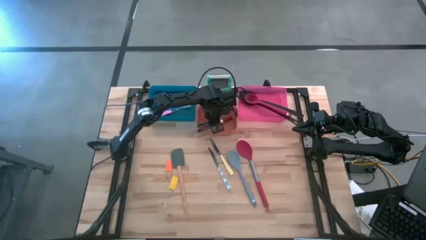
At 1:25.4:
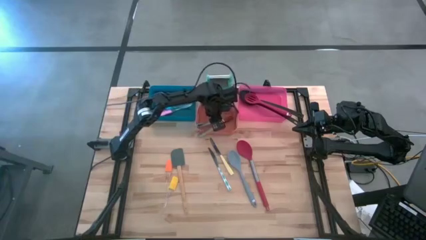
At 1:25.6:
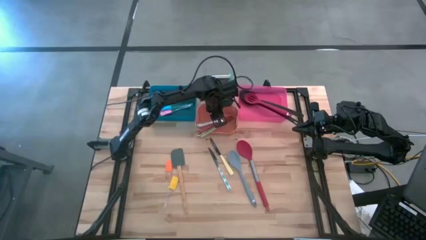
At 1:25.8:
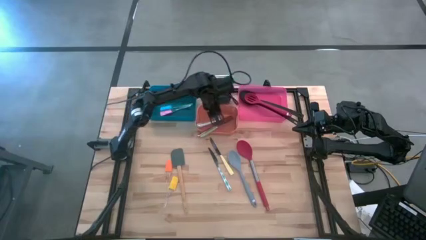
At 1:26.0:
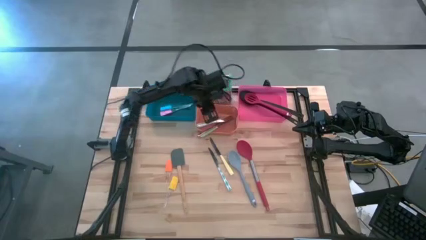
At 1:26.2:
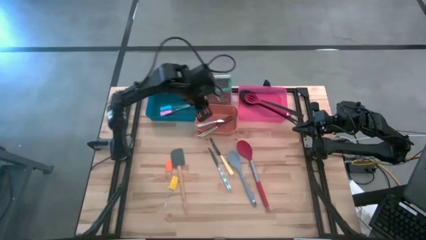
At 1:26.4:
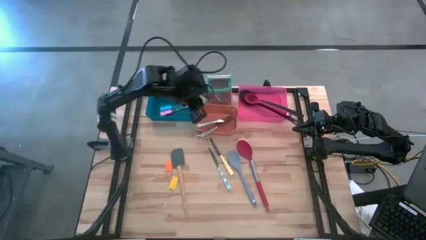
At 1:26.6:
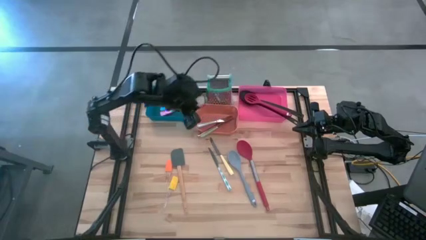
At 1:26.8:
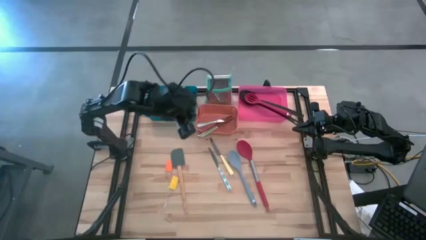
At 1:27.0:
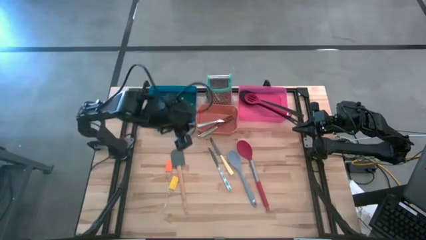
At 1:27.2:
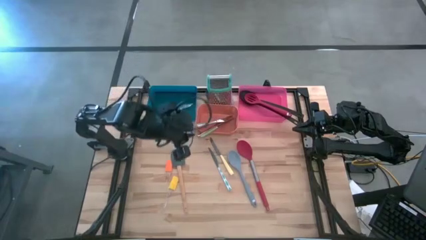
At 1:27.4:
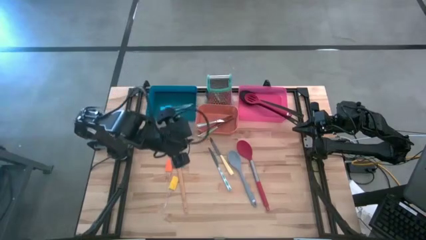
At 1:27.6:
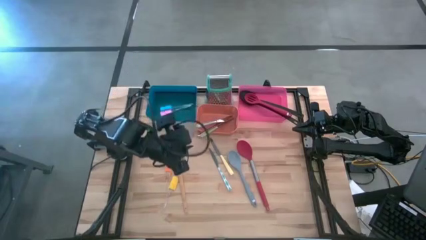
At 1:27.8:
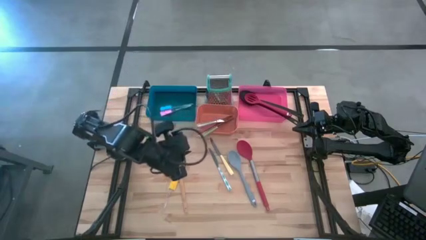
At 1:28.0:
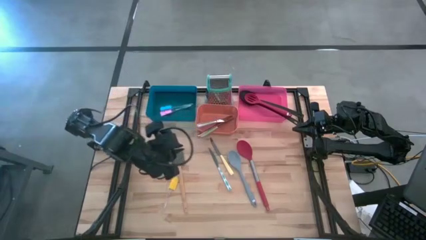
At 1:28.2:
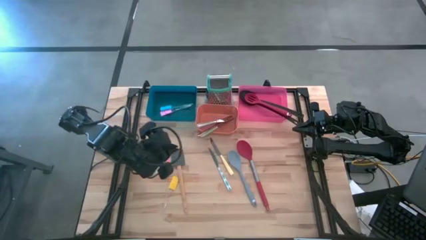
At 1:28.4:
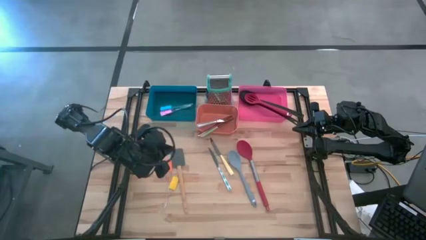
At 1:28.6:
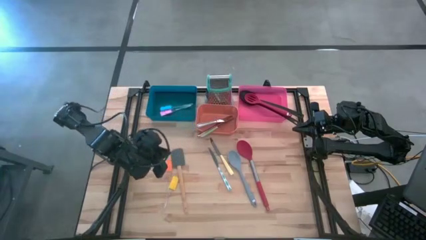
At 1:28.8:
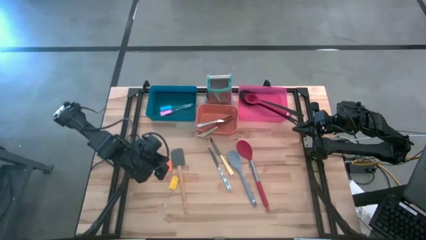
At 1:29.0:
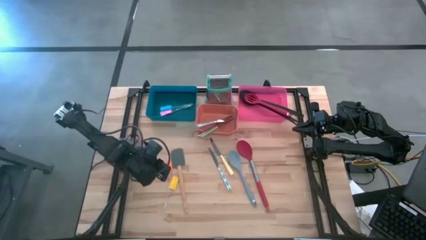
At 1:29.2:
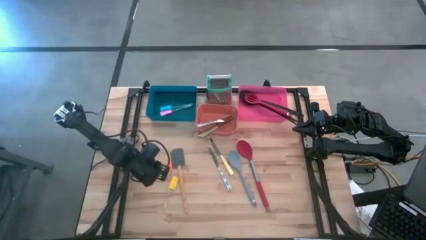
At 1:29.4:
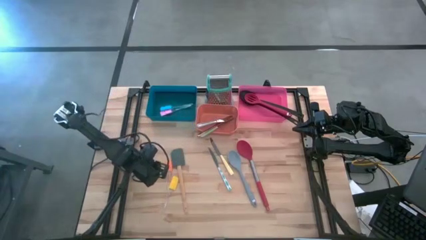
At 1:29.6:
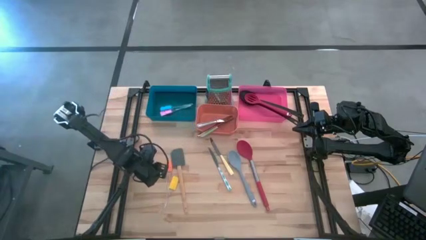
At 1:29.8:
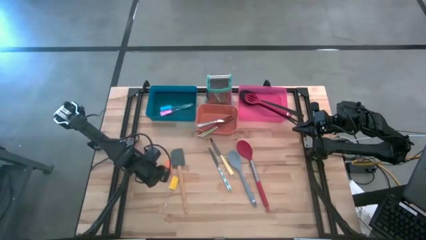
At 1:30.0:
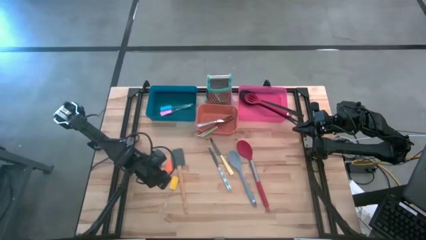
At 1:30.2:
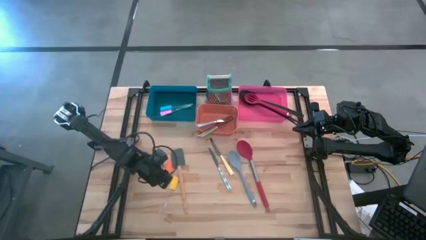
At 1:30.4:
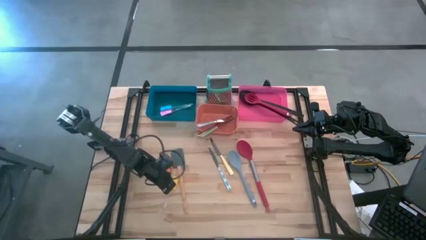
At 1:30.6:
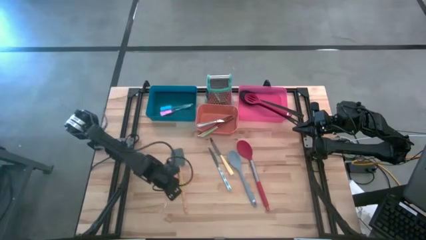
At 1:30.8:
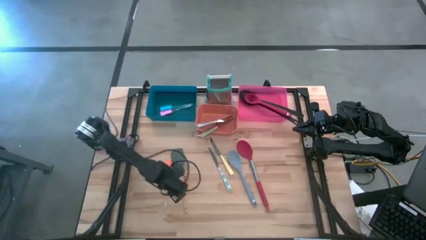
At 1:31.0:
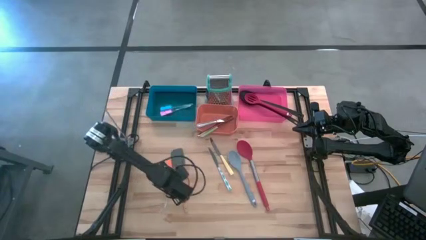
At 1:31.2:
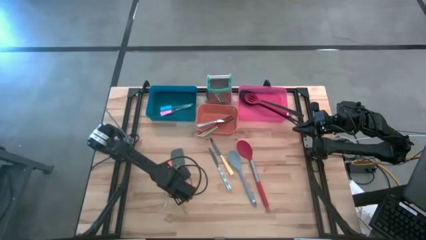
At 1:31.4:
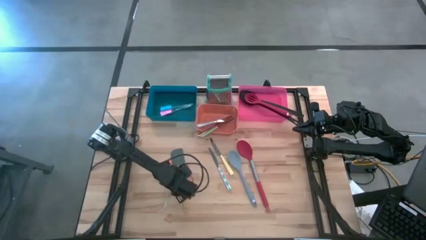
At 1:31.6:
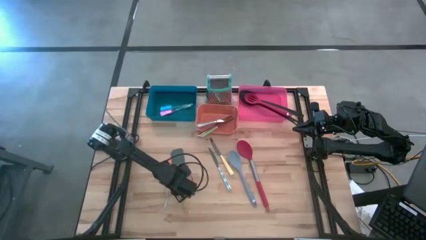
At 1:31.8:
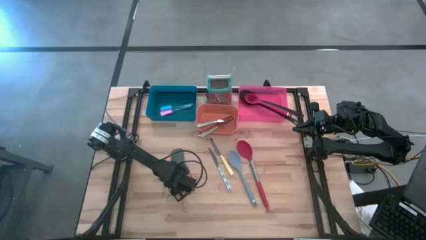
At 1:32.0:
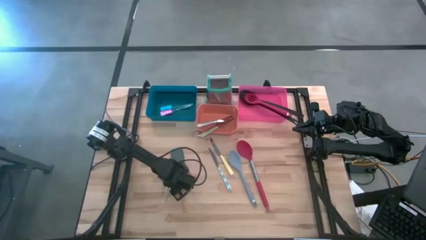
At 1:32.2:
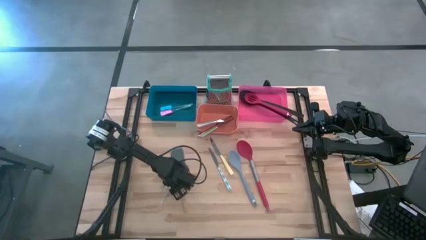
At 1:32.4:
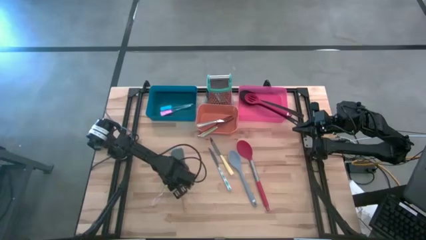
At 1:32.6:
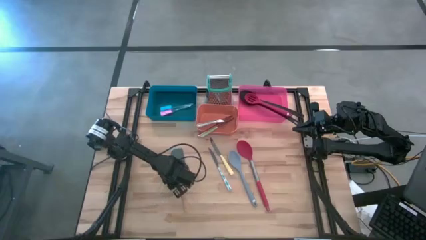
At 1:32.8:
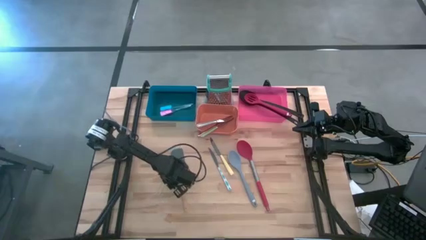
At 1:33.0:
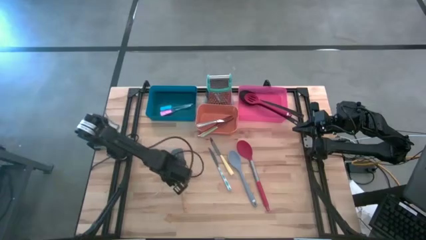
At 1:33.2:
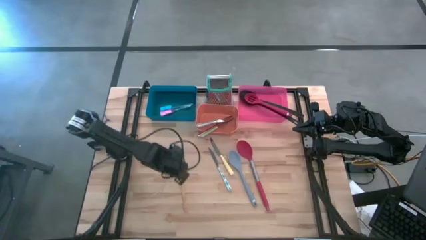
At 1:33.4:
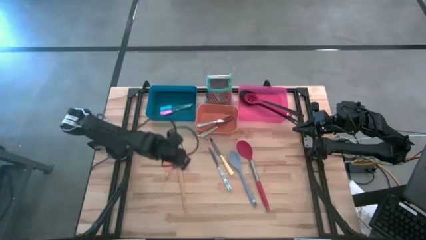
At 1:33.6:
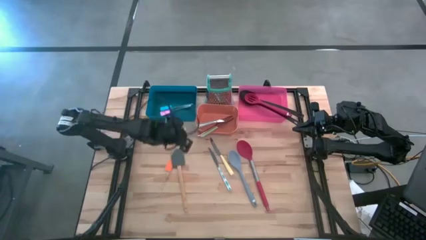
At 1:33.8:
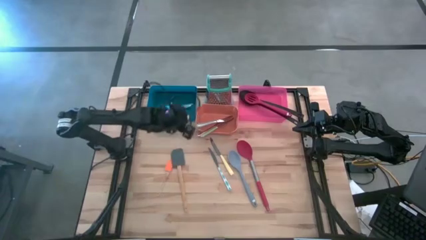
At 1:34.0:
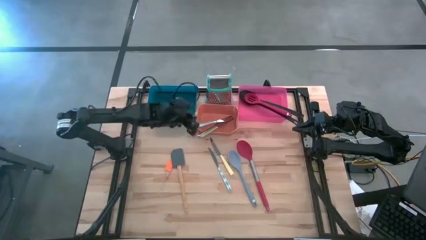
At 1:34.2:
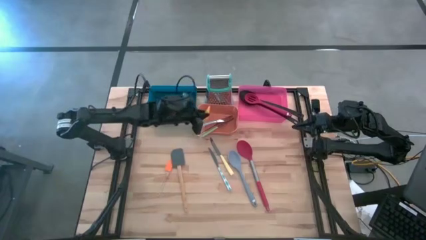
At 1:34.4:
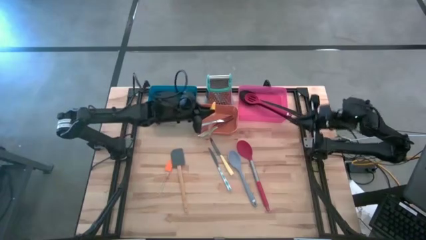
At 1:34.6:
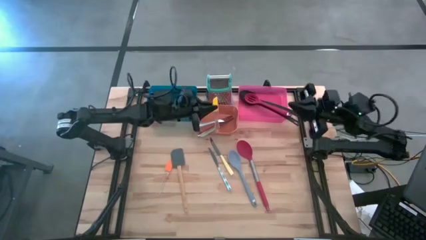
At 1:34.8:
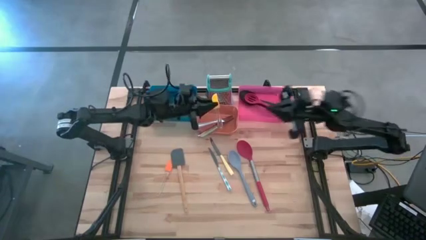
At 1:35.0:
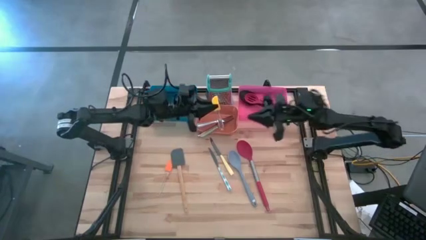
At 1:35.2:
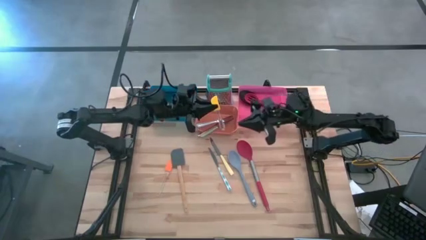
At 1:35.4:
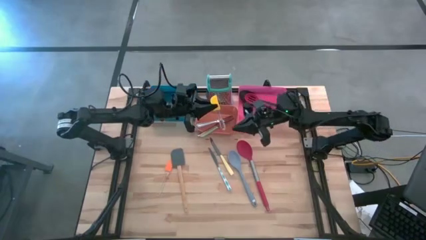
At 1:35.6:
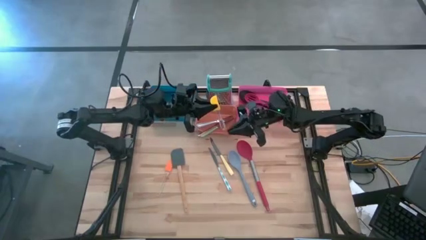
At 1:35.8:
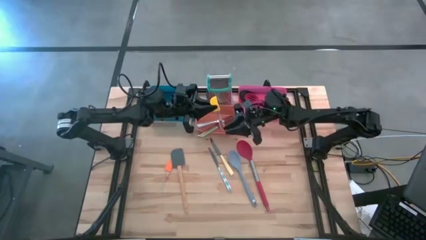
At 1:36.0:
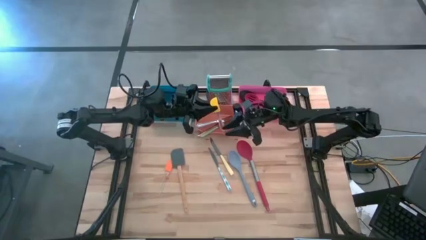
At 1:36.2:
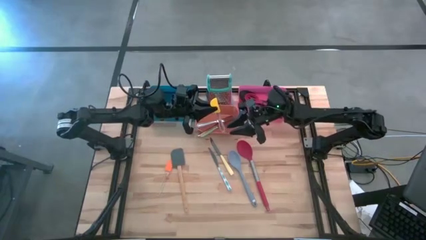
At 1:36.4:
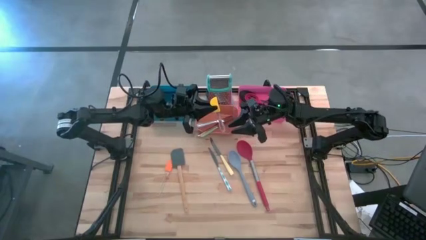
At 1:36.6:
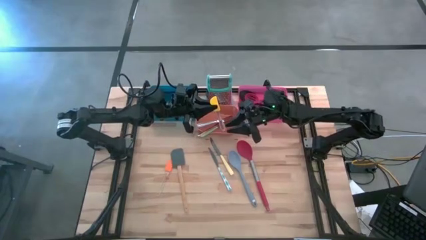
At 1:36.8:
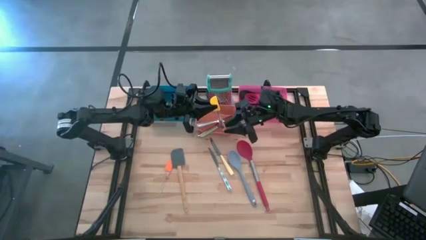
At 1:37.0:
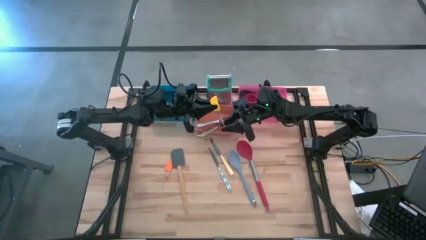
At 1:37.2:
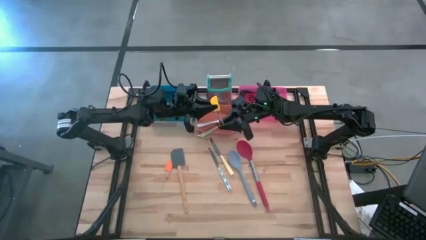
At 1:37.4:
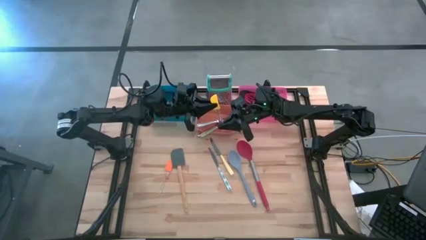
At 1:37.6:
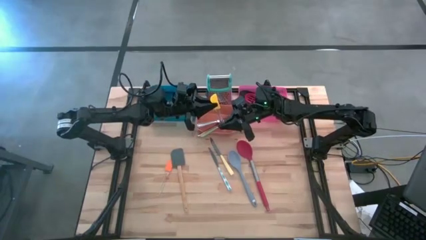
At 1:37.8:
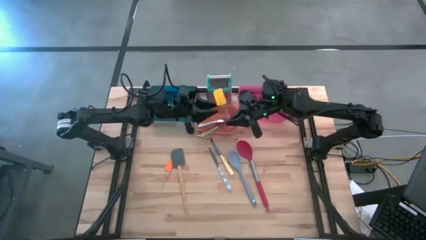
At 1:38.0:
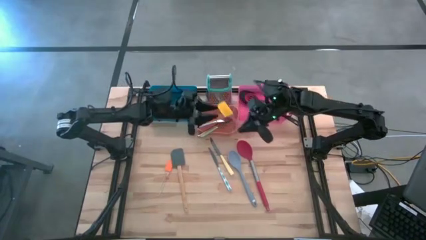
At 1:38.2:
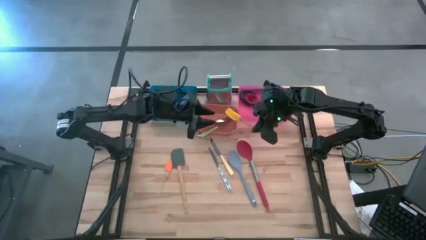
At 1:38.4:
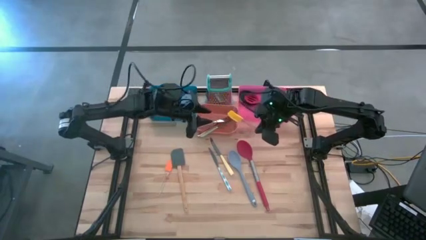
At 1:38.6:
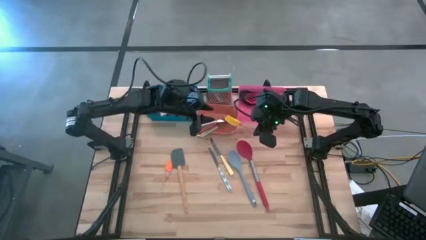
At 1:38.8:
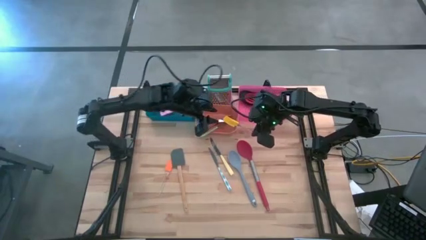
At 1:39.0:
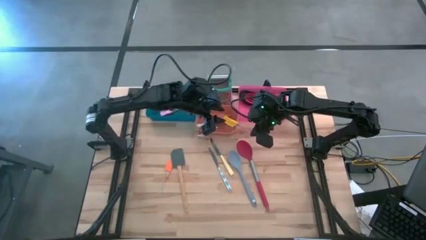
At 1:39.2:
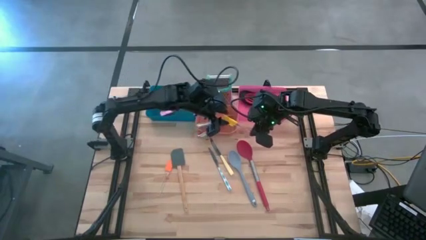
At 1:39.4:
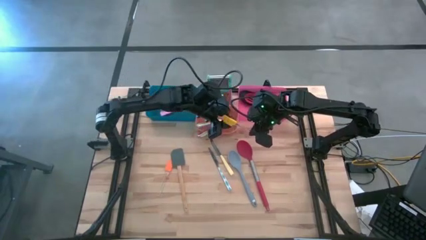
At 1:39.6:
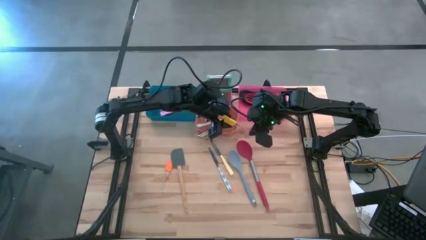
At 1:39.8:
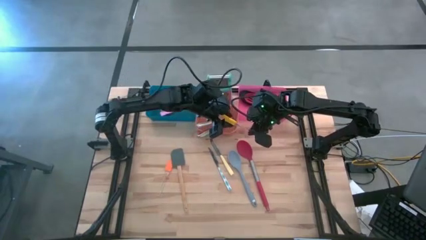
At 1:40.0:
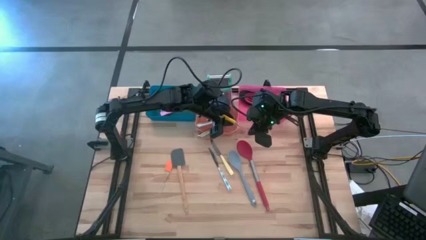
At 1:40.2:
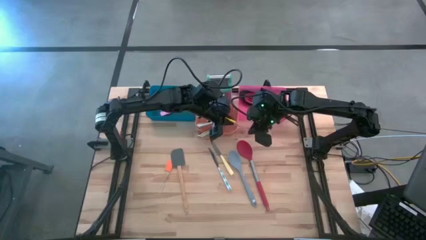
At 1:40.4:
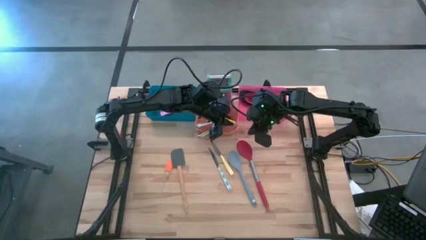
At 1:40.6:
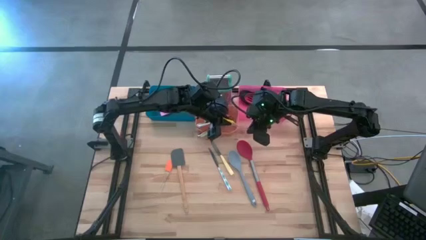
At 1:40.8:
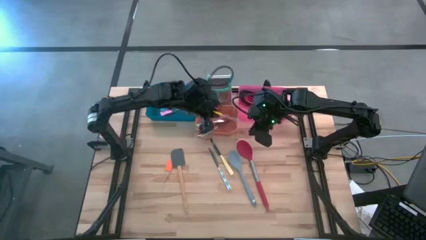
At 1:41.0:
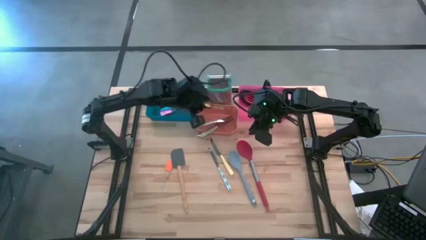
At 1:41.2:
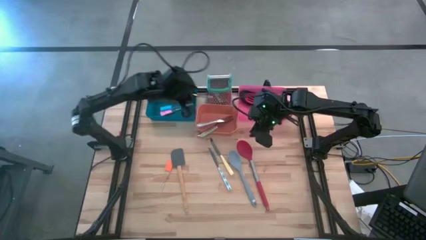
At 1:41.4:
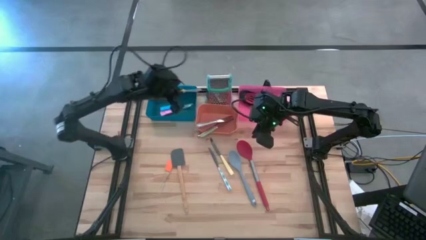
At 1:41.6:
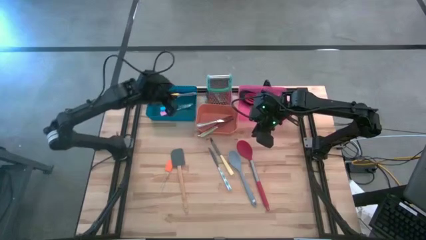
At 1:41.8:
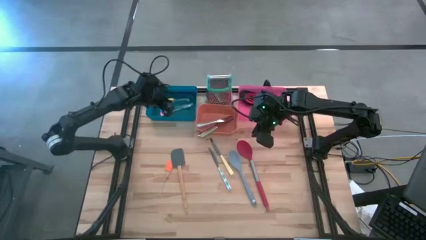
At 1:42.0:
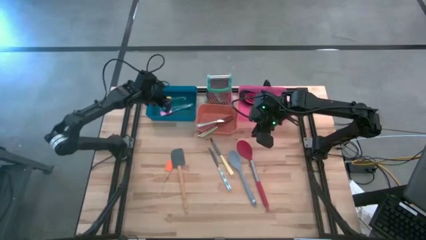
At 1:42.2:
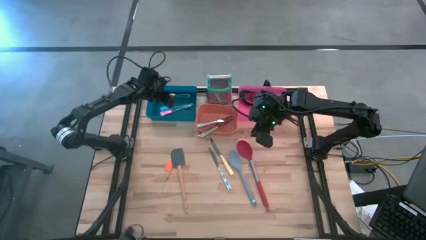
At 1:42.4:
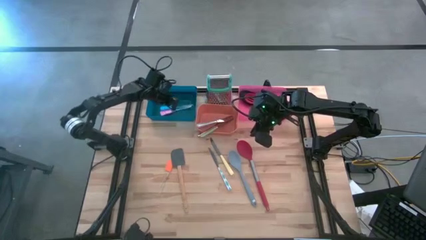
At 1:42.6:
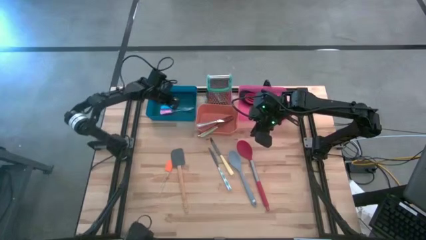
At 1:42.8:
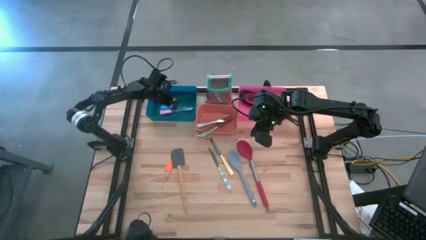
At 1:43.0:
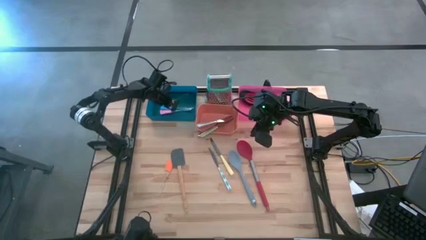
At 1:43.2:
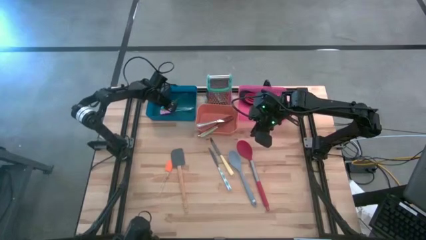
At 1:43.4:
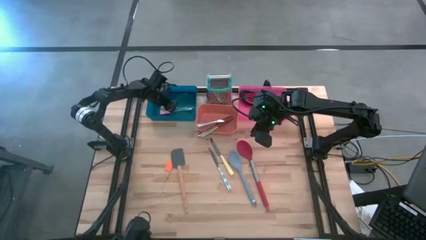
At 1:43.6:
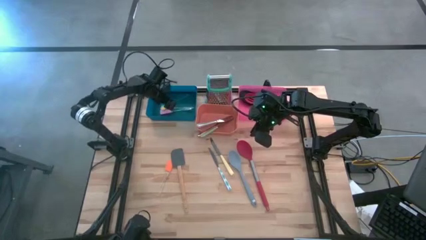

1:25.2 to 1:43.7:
Task: Pick & Place Kitchen Items
Put the yellow spatula into the blue bin
